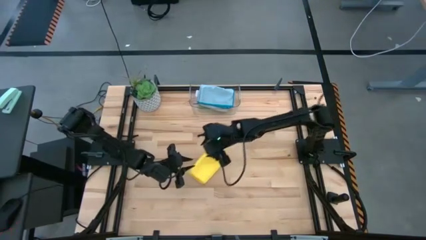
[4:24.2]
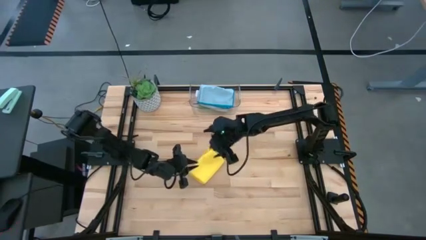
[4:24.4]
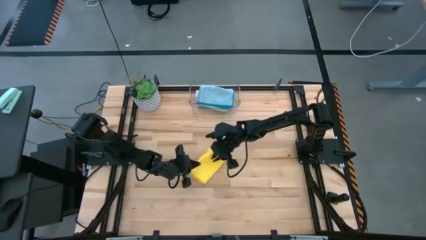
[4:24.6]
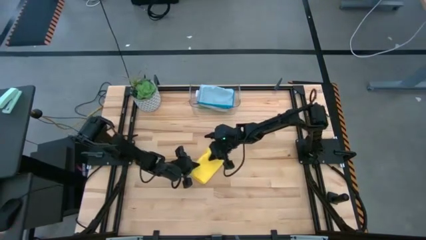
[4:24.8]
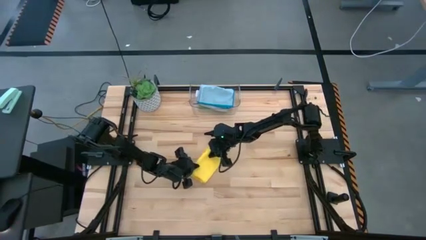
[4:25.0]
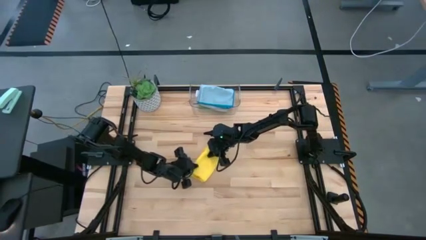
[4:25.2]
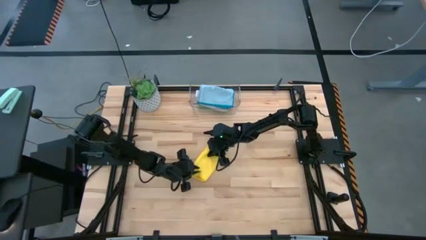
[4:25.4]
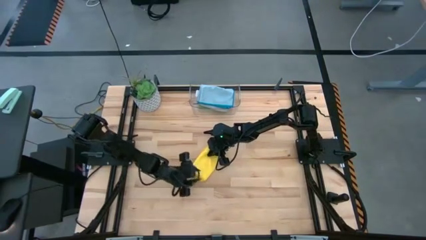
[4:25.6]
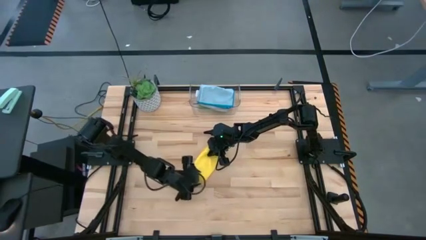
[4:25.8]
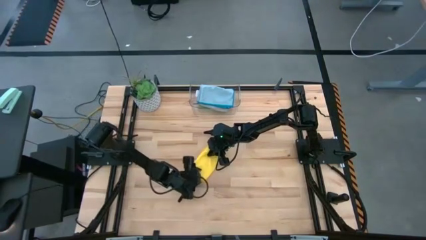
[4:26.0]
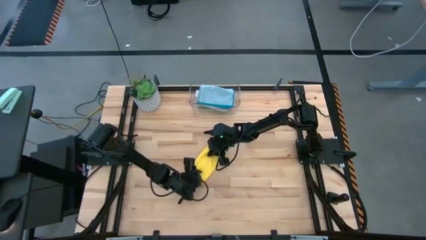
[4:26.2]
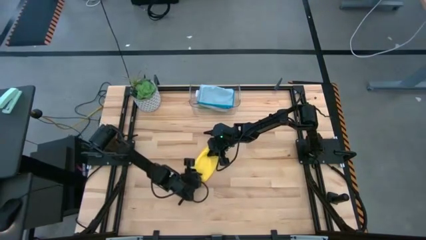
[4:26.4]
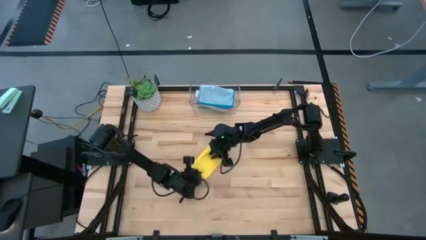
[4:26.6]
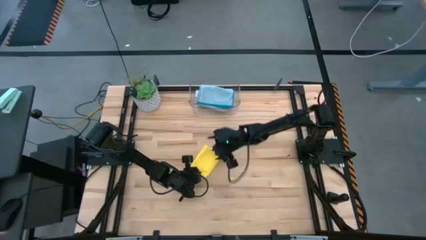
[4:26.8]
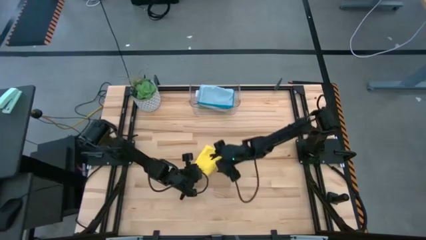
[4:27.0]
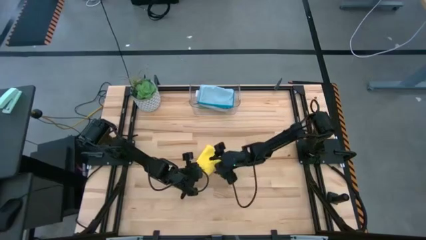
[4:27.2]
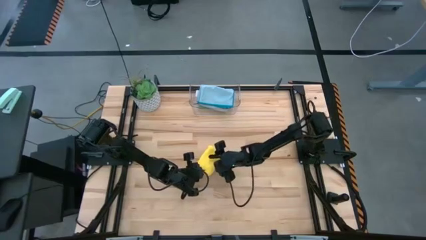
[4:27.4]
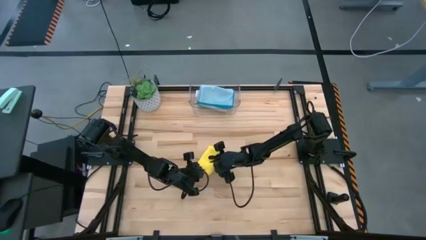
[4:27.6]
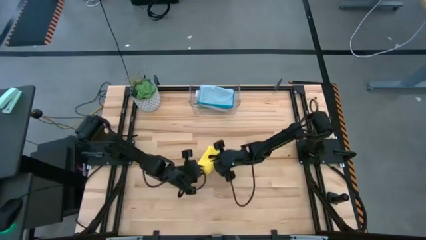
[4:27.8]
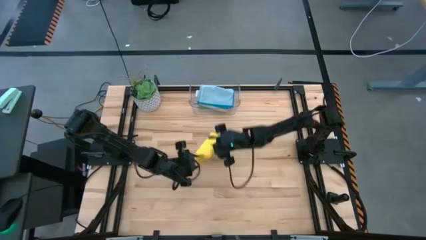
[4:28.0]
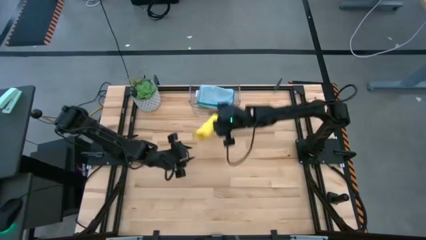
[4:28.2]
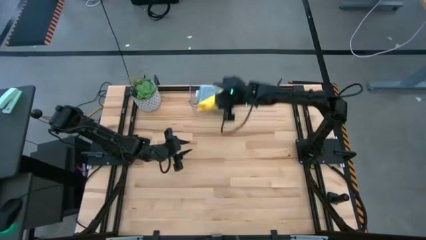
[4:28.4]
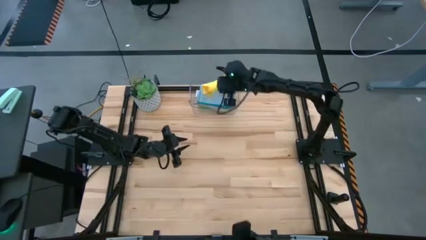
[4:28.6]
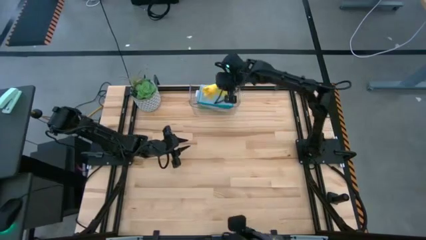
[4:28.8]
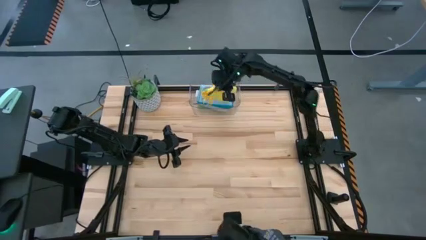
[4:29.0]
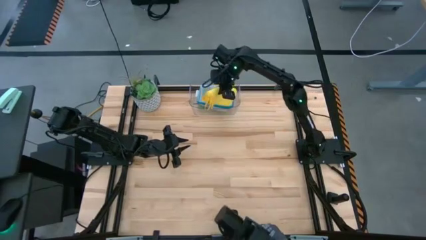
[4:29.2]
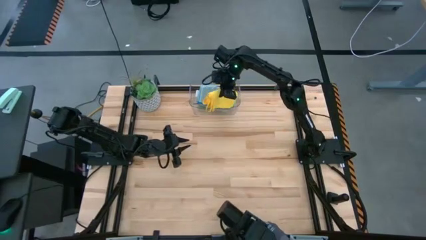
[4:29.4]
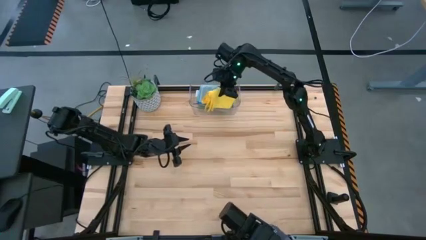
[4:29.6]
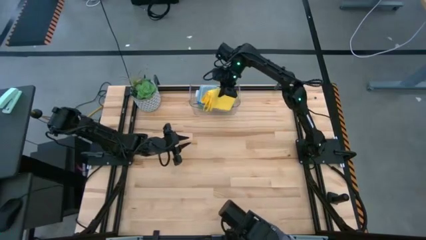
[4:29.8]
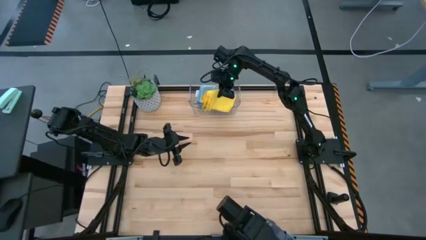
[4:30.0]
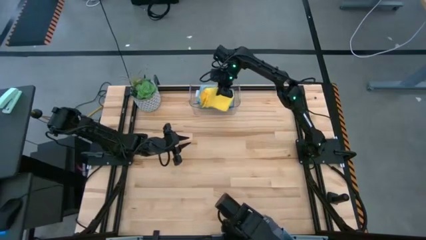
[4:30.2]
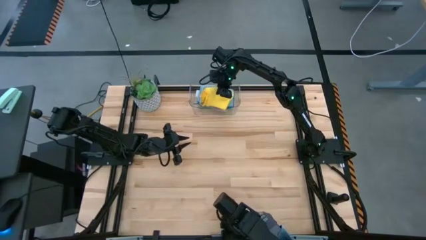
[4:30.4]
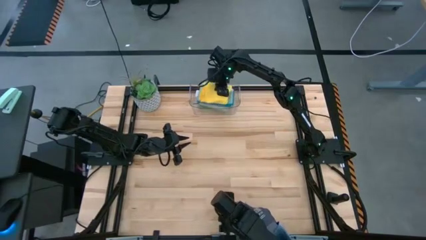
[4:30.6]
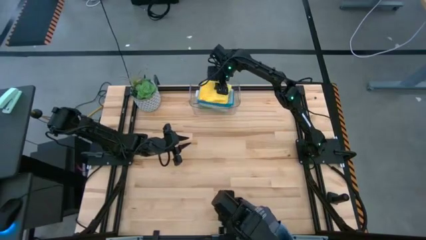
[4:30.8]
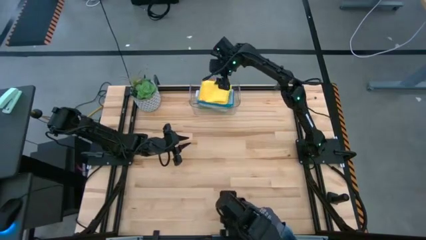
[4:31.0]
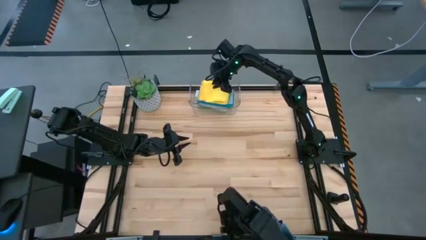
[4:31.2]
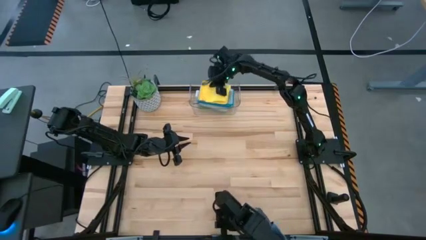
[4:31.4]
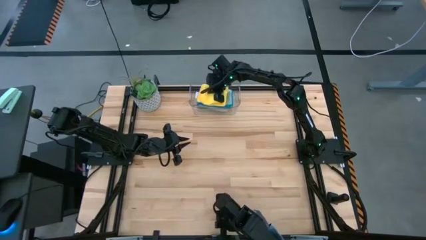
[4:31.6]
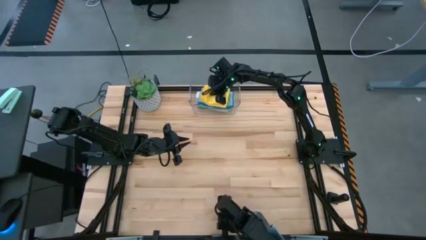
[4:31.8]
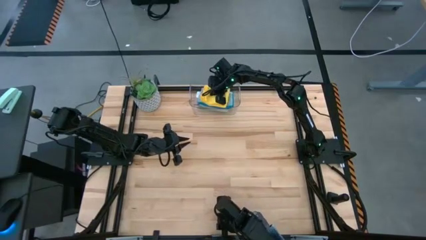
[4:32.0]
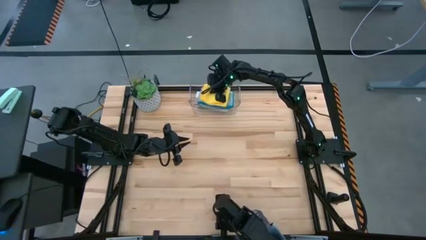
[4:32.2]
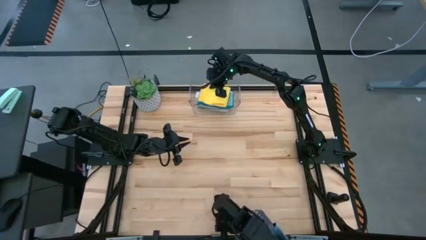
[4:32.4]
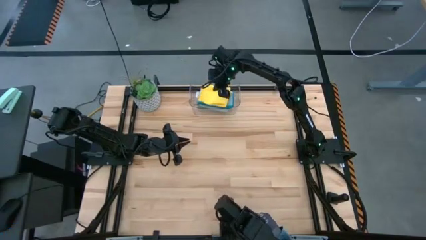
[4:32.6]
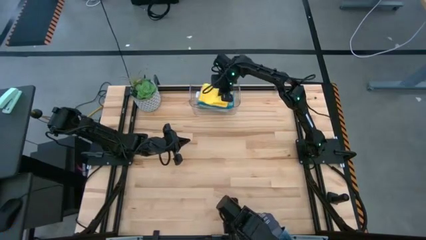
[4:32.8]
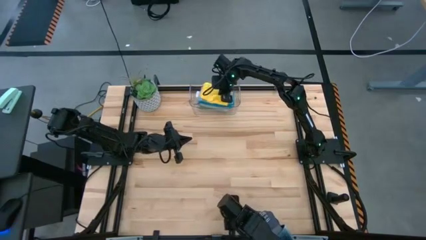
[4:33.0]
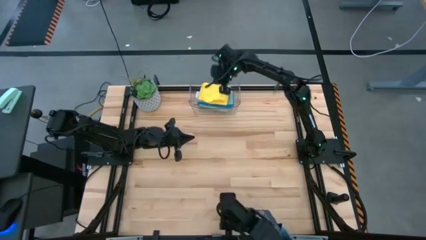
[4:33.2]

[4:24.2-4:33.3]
Task: Fold microfiber towels
Stack the folded yellow microfiber cloth on top of the yellow microfiber cloth

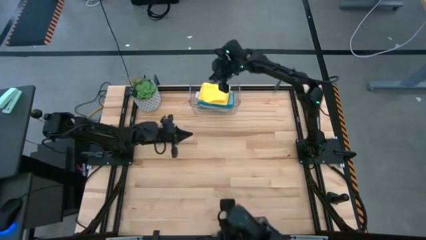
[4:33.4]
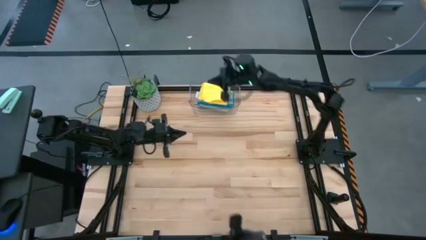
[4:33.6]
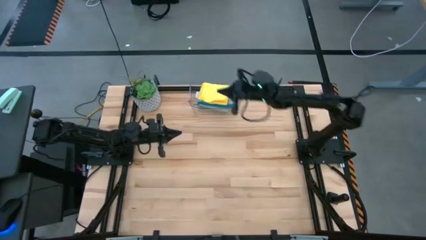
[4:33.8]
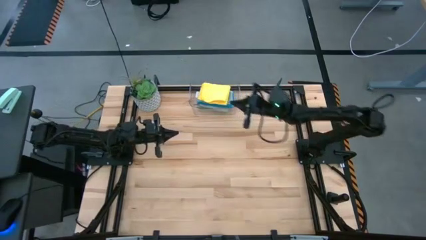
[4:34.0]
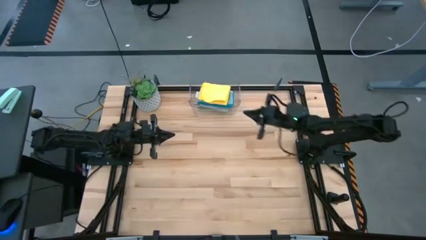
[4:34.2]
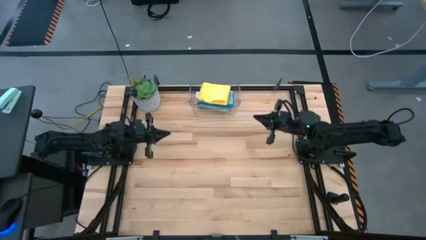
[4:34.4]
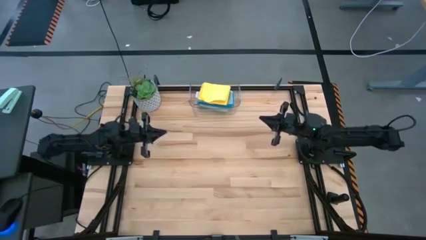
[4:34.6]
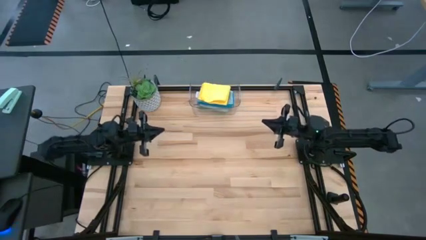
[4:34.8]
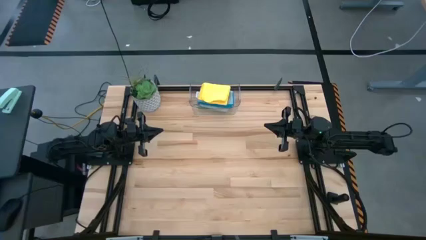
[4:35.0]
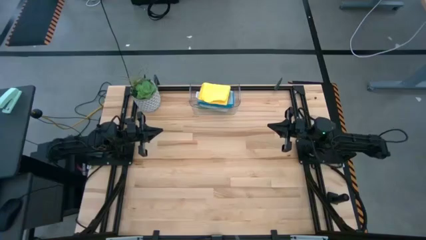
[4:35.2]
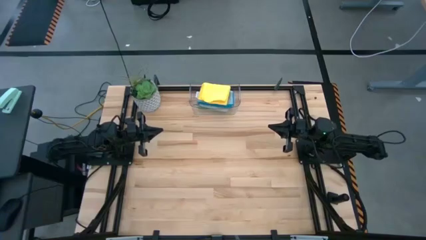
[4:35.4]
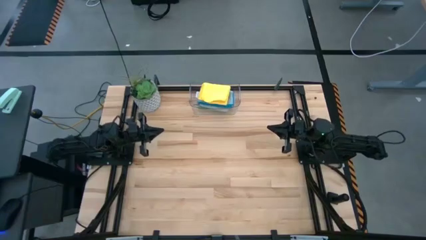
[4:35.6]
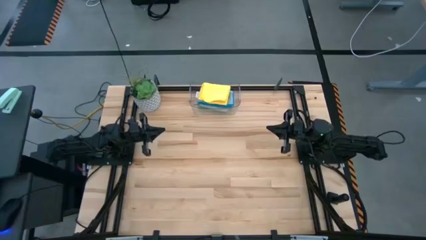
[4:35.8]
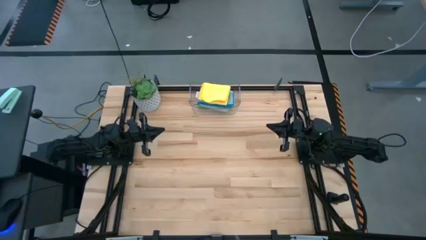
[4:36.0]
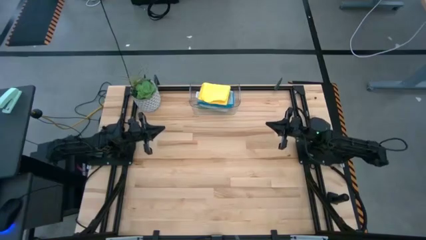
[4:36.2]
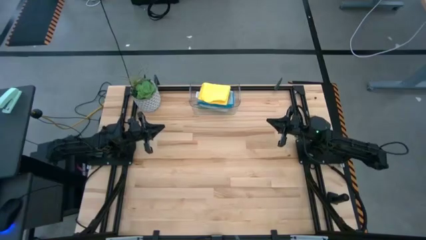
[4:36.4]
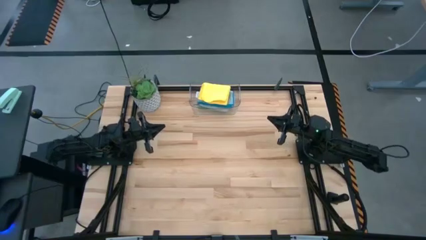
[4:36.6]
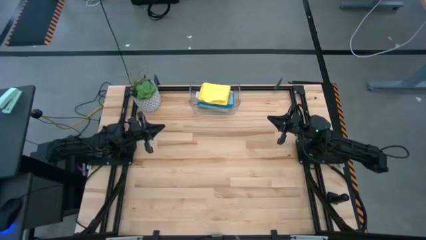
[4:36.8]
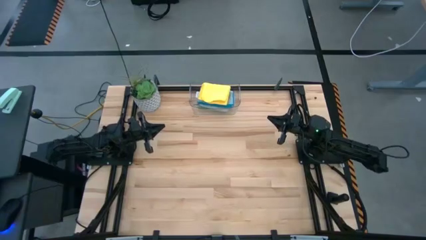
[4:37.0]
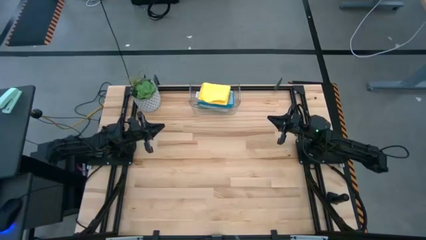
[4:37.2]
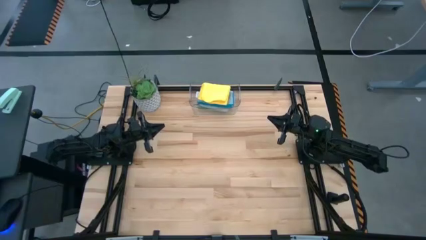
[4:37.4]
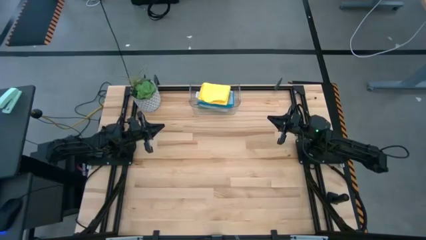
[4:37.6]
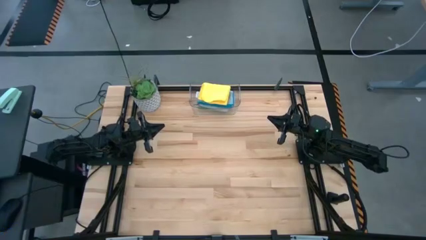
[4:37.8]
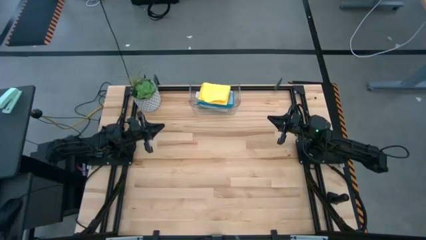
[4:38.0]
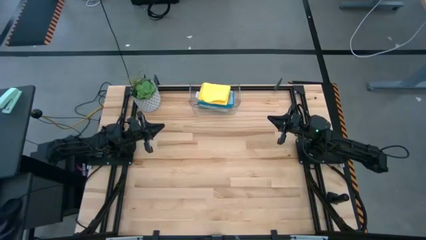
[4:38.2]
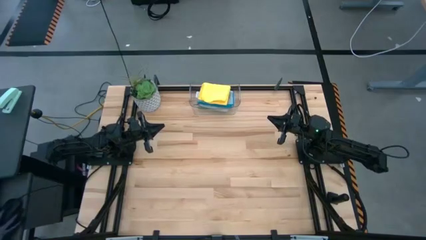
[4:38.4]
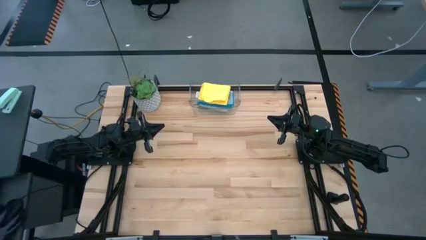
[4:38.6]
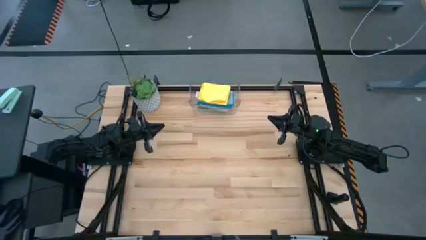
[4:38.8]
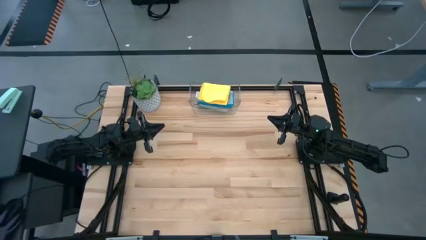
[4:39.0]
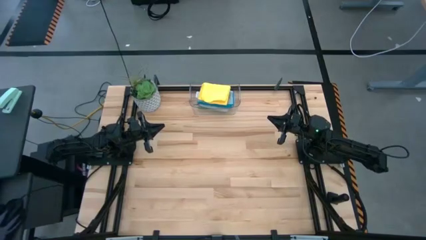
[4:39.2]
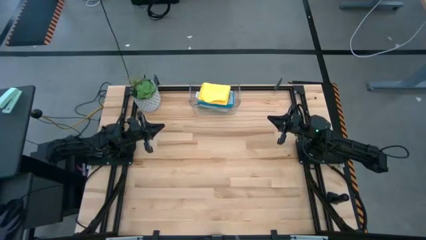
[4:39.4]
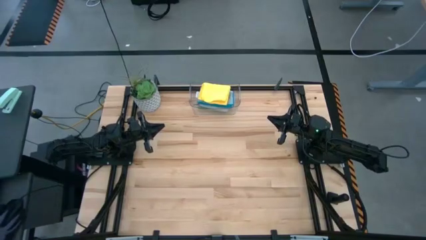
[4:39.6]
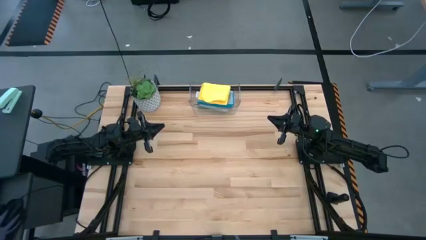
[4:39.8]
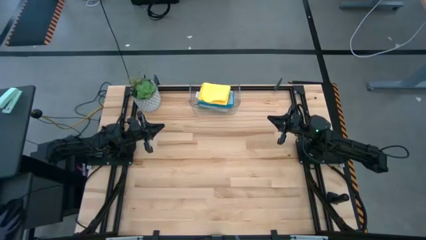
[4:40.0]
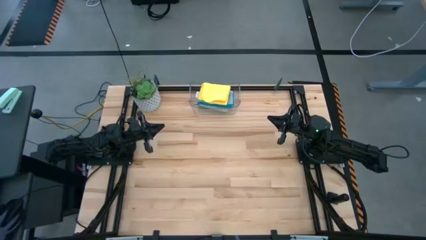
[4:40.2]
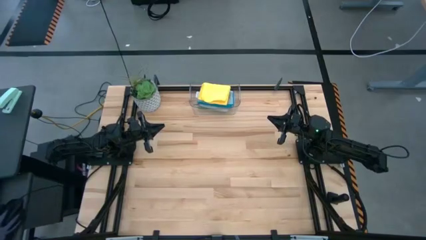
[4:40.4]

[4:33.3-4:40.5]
Return to Home Position
